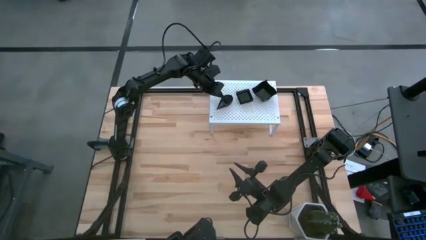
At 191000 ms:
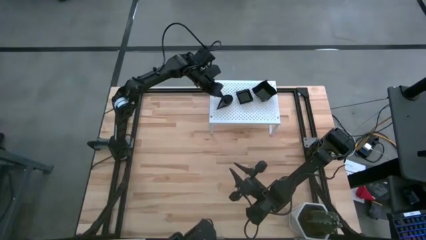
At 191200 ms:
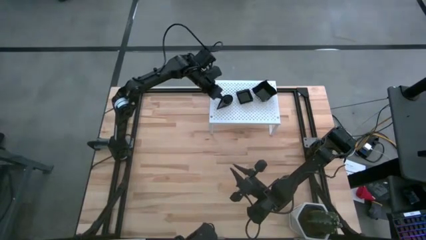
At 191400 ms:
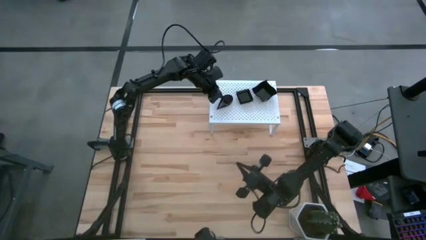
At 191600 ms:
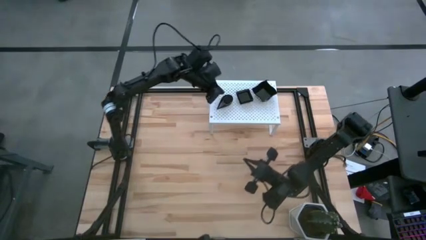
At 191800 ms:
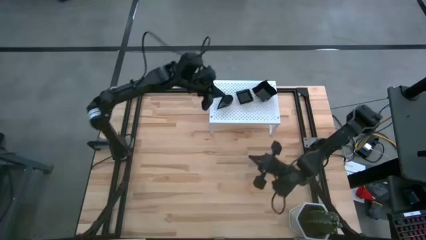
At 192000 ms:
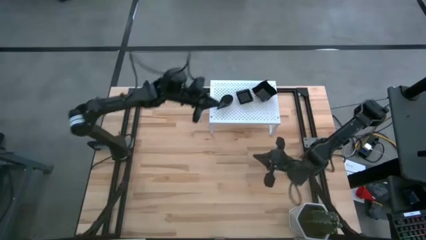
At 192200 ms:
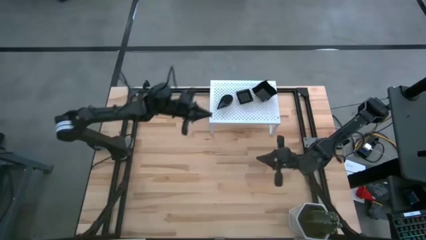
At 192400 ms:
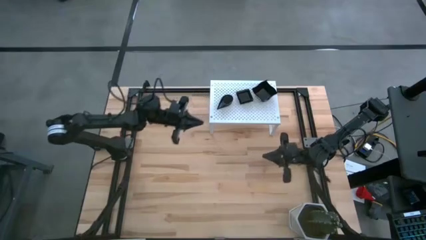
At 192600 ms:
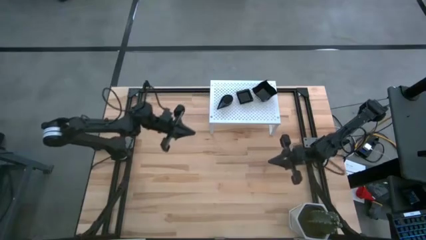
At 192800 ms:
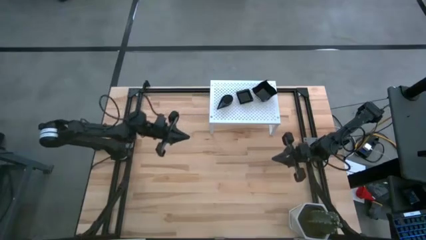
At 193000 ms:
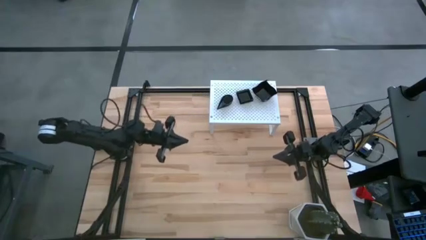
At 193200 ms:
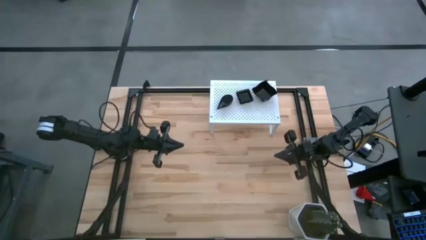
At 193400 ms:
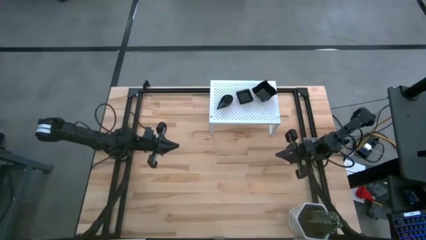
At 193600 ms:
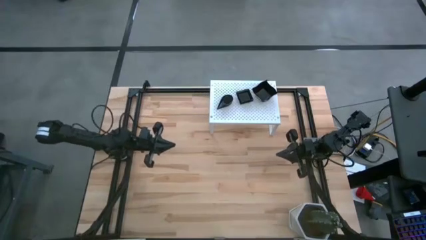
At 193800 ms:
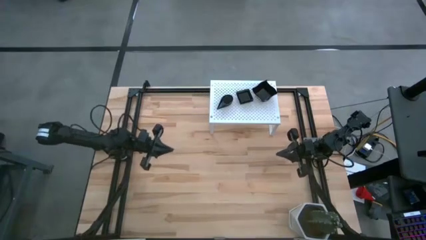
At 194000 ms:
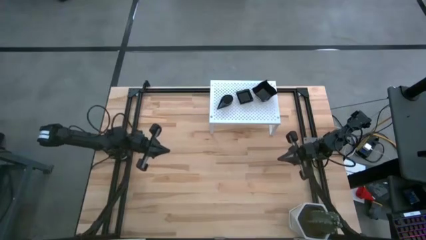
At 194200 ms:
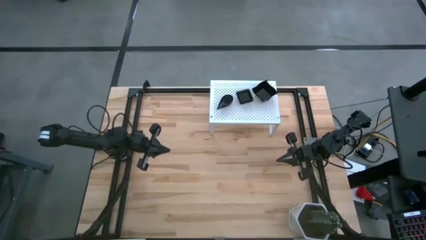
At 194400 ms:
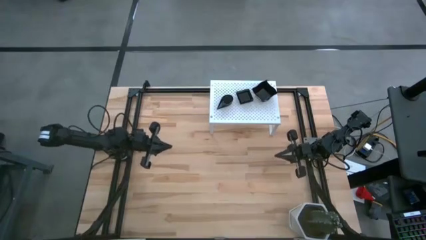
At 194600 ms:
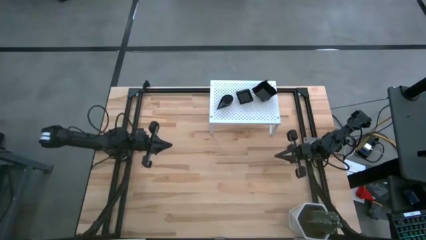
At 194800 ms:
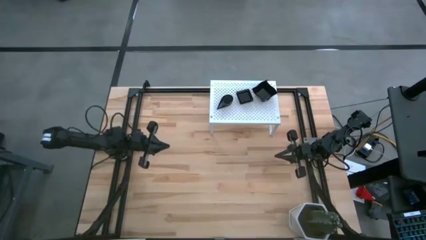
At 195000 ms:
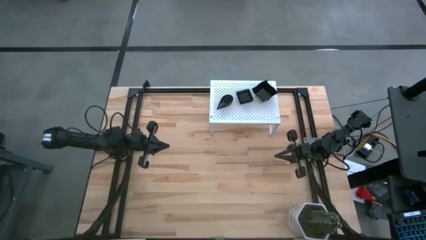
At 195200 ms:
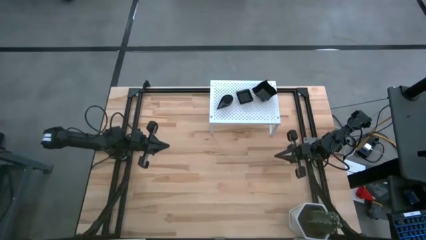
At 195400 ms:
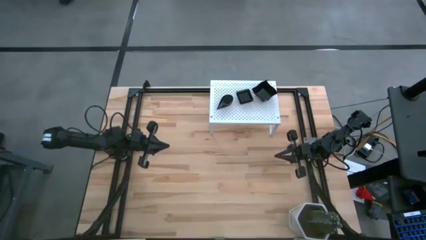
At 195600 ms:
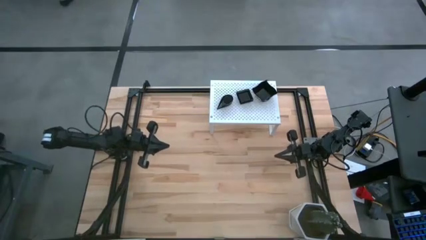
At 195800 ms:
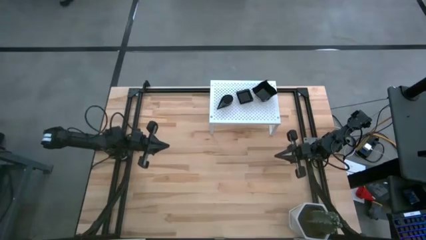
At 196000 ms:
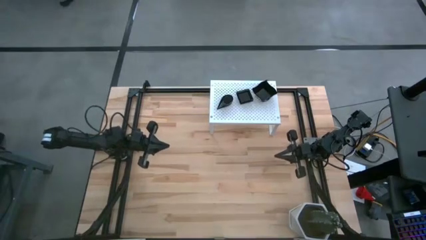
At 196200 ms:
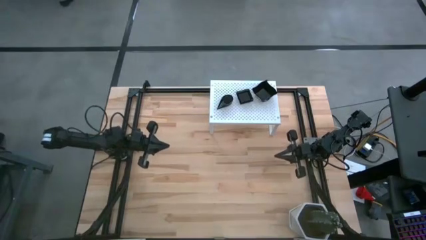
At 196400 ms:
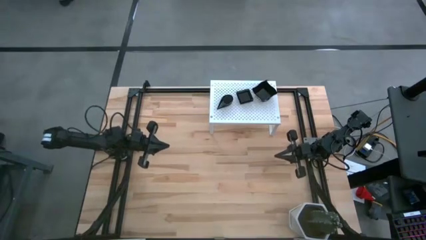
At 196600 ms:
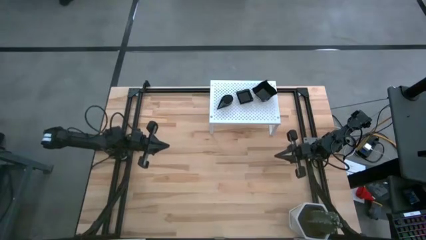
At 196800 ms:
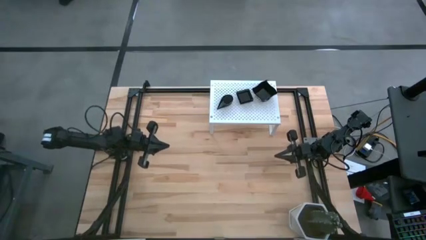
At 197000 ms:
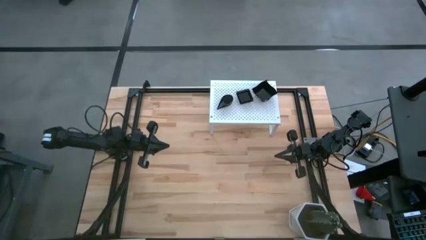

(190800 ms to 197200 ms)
Task: Pick & Place Mini shaped plates
Return to Home Position

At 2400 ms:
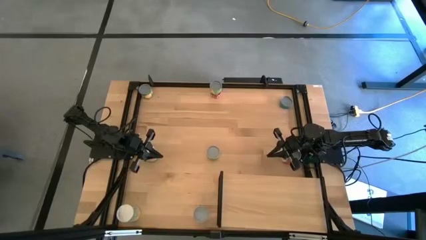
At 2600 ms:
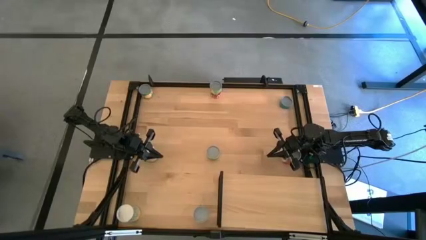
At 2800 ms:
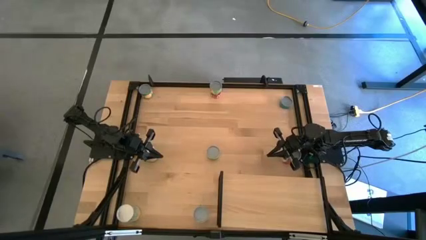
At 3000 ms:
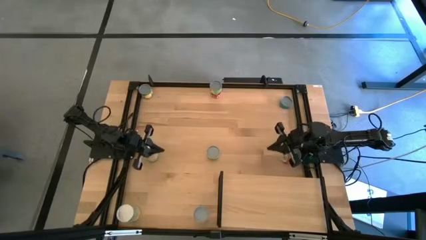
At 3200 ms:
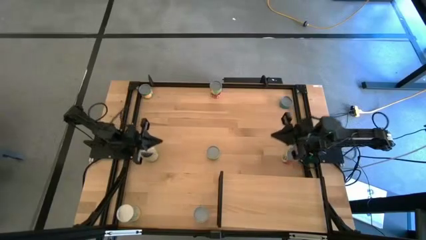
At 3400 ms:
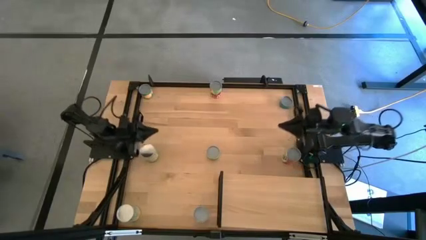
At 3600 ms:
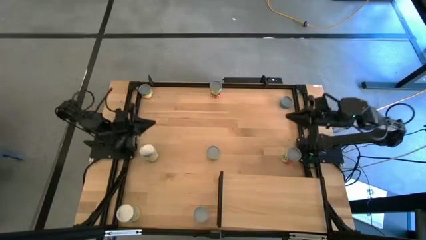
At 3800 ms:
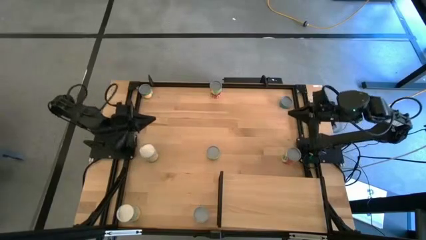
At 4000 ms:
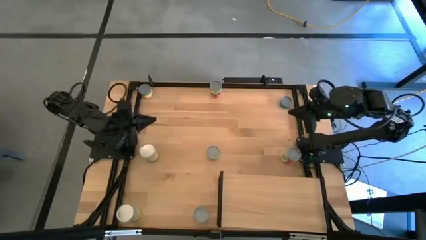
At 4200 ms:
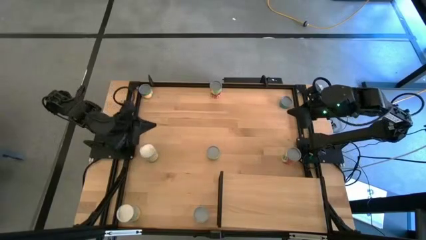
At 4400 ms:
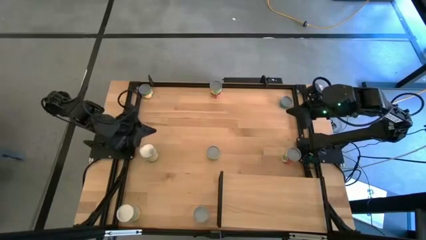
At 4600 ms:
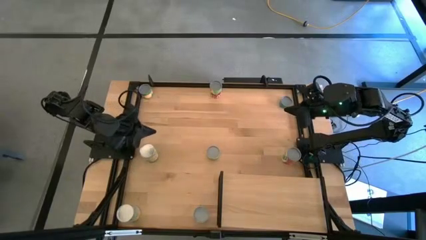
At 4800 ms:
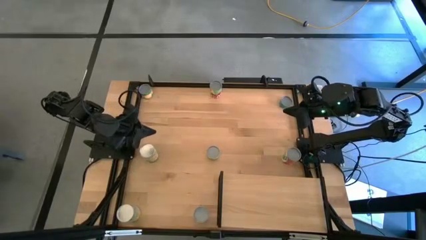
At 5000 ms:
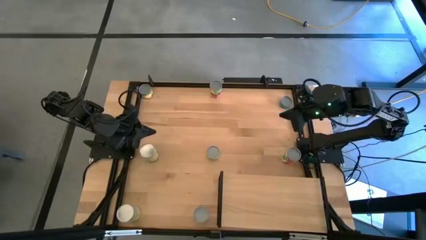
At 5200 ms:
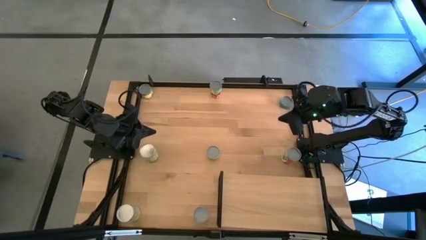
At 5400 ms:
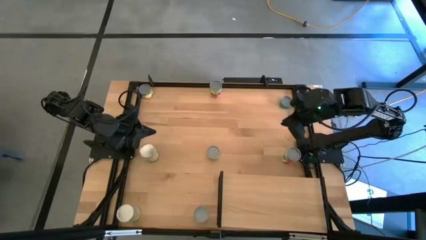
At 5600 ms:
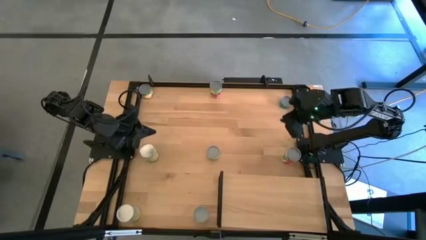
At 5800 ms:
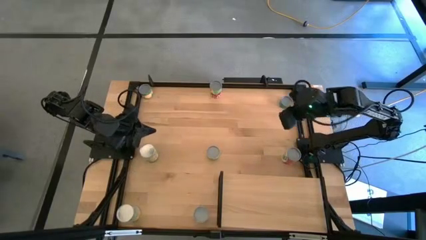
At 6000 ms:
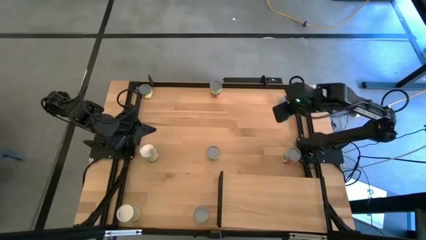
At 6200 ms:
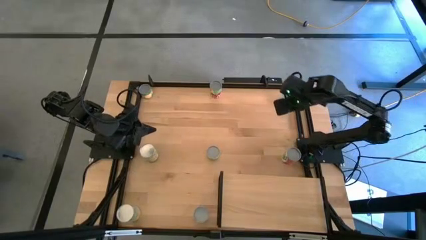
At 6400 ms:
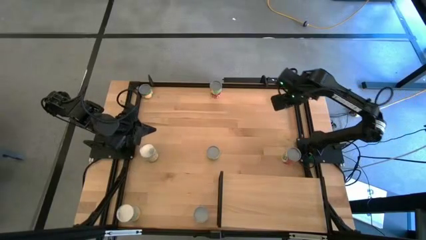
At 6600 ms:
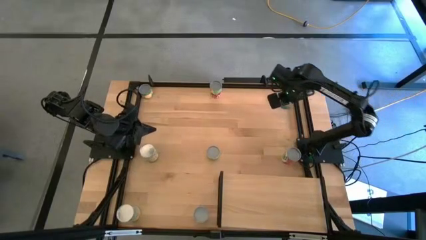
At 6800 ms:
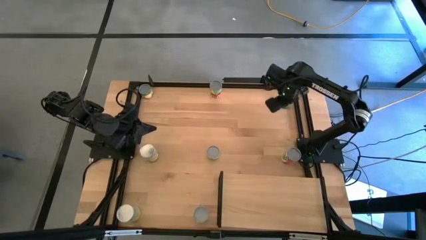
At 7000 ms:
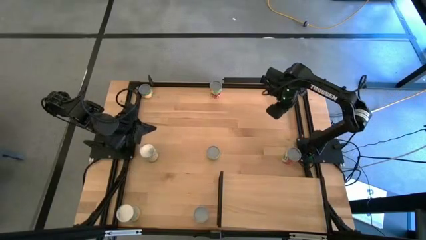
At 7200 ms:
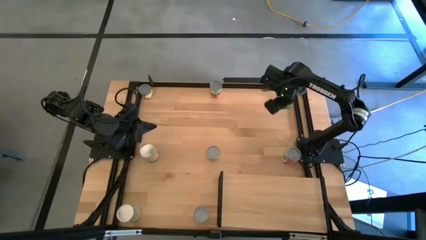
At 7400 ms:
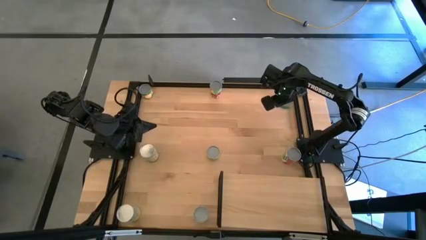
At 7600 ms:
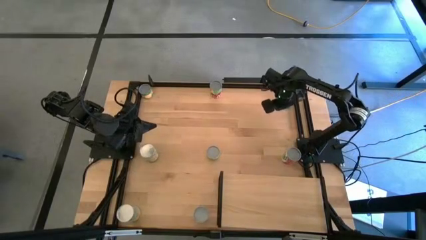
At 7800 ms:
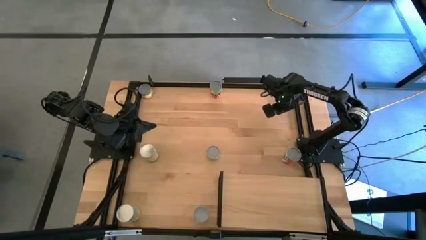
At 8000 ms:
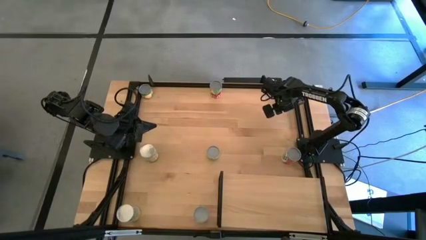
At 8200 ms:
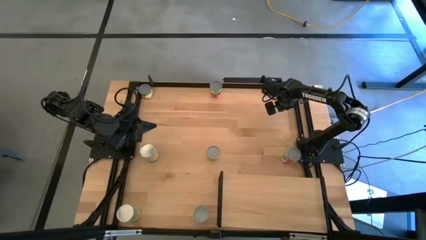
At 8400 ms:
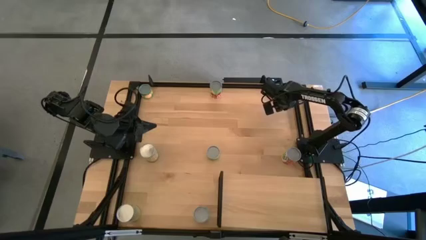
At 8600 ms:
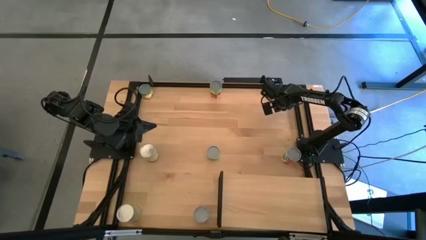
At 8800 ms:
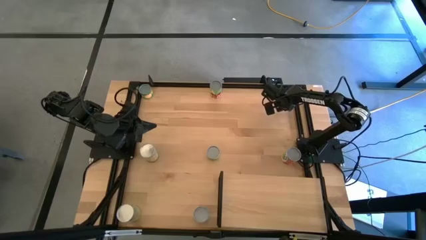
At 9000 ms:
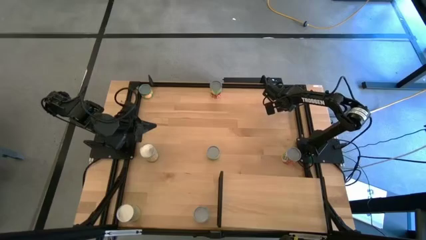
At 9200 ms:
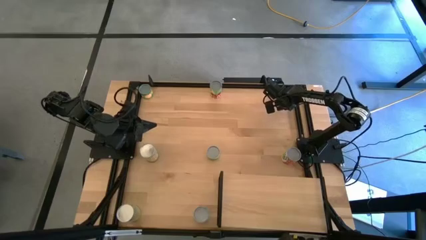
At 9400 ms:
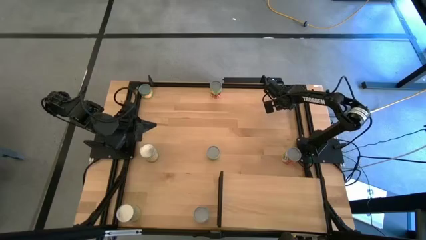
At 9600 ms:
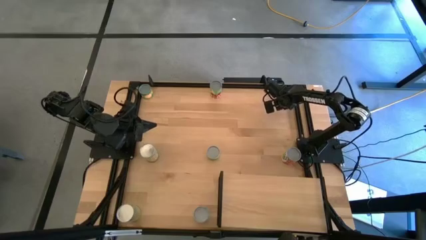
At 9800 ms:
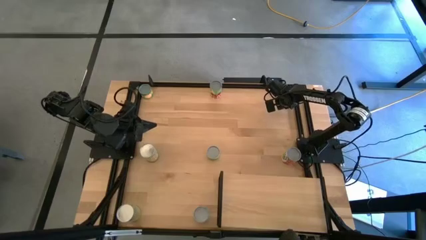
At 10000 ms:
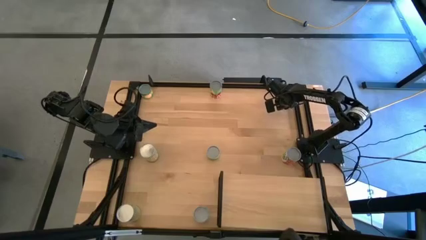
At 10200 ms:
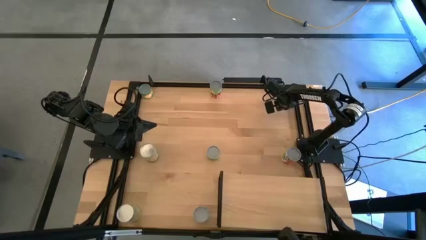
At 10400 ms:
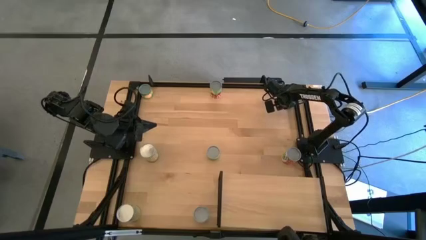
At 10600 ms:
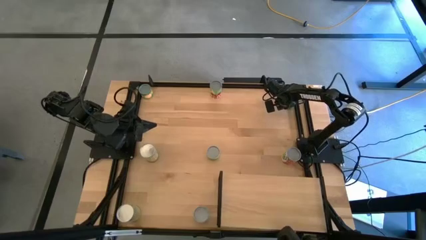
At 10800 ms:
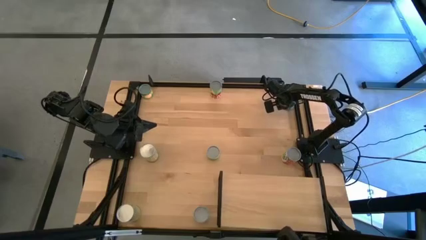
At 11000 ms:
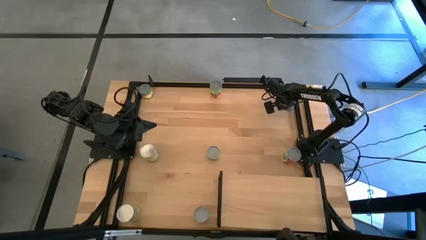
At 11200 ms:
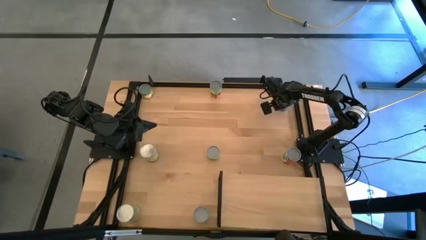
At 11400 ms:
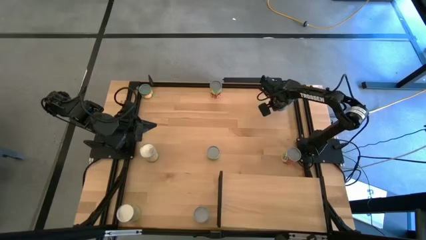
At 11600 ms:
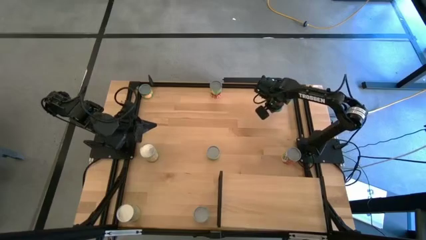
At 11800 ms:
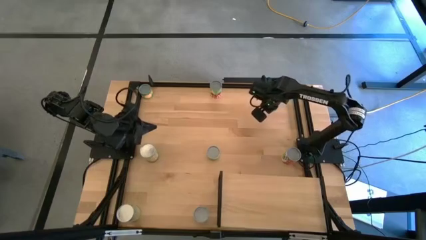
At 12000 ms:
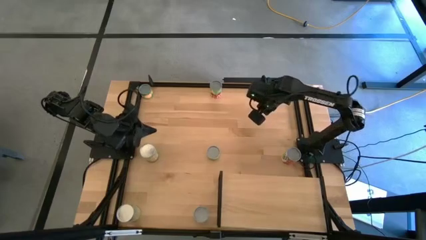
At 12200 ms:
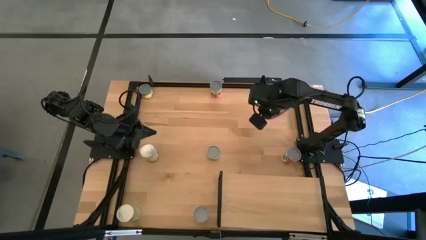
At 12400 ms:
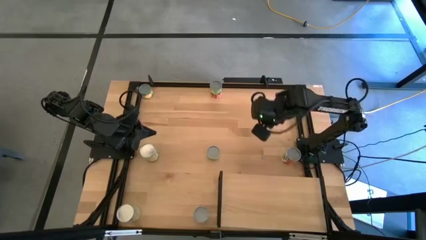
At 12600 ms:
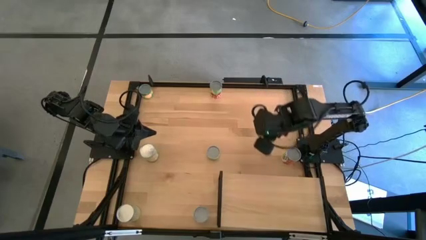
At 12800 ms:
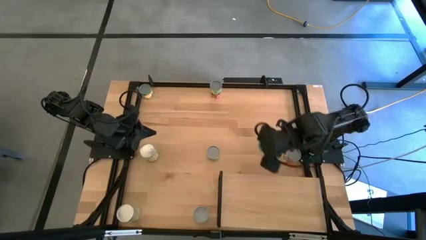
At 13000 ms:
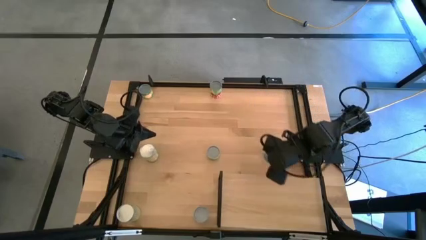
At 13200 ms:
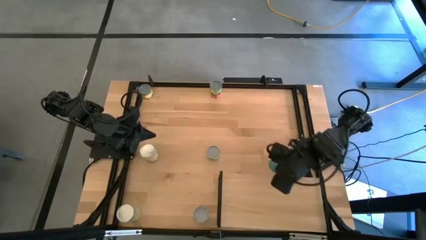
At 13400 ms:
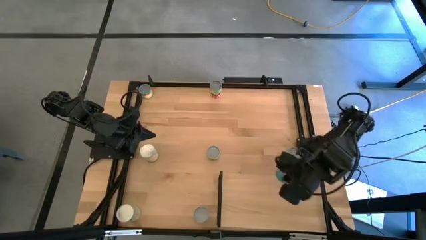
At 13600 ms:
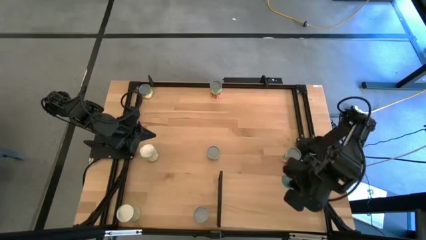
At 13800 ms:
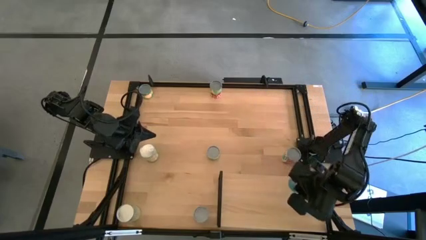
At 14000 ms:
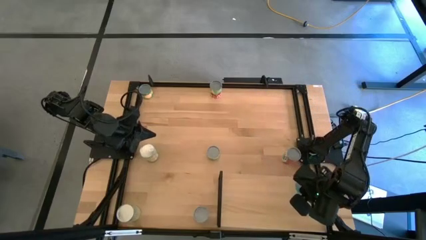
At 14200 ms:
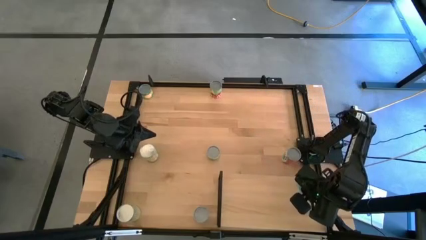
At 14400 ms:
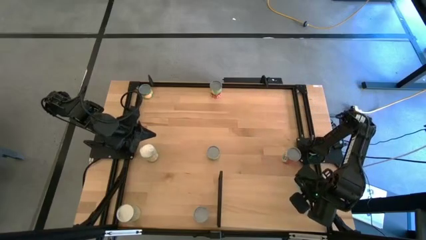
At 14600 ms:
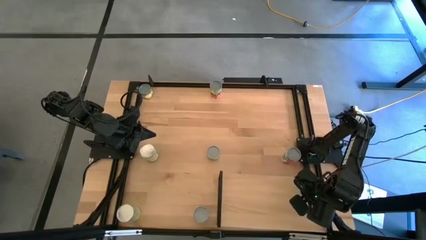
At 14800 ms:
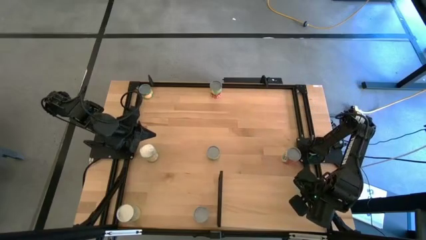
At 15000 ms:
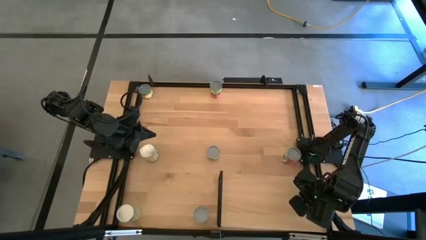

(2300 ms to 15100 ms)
Task: Pick and place cans onto a shelf
Put the canned tuna on the shelf
